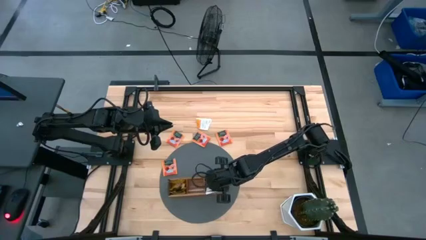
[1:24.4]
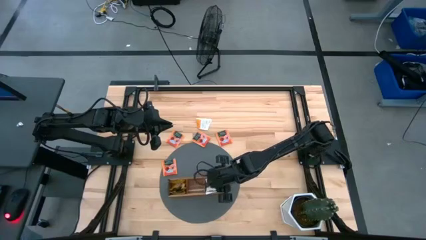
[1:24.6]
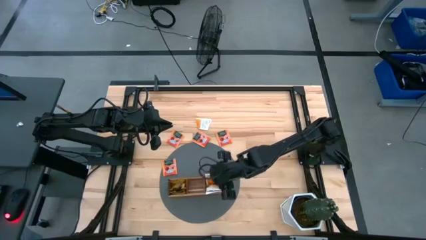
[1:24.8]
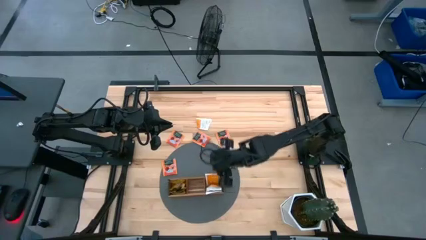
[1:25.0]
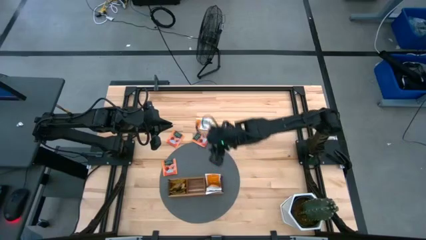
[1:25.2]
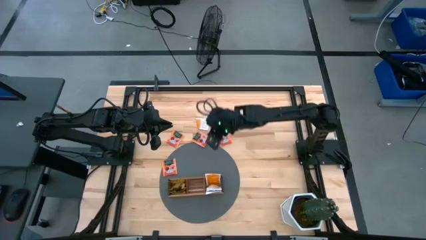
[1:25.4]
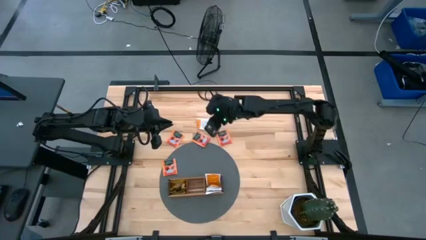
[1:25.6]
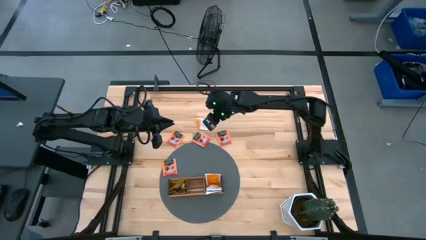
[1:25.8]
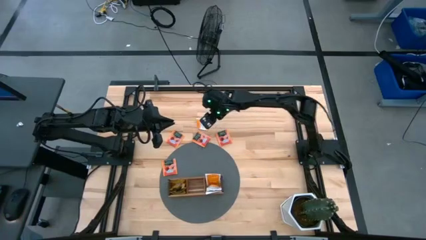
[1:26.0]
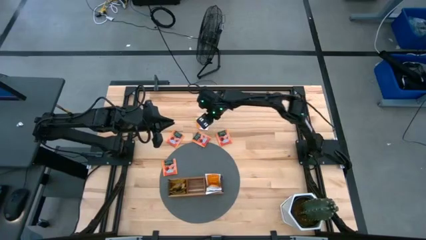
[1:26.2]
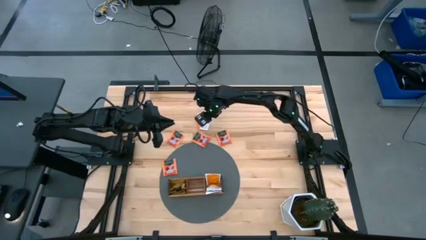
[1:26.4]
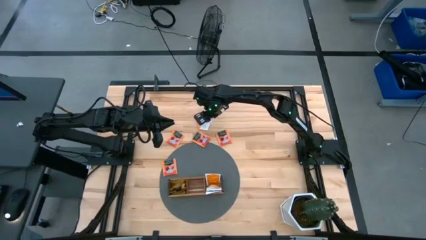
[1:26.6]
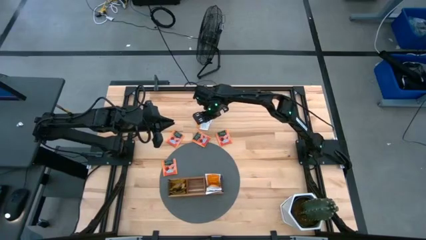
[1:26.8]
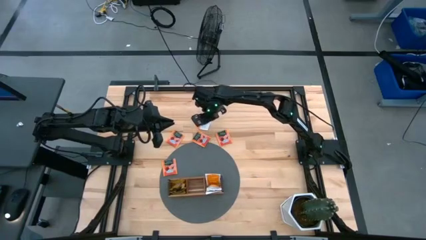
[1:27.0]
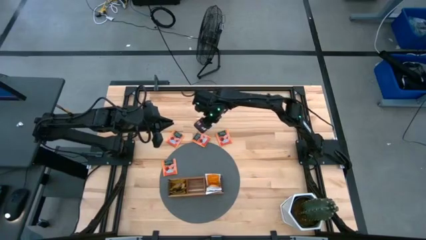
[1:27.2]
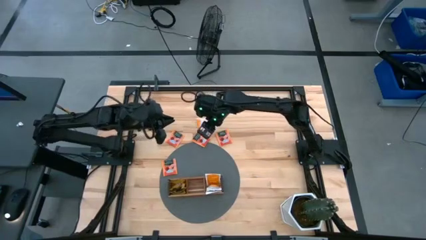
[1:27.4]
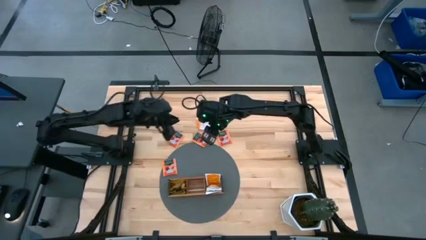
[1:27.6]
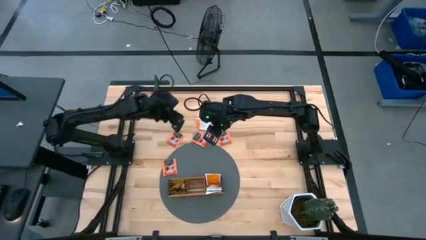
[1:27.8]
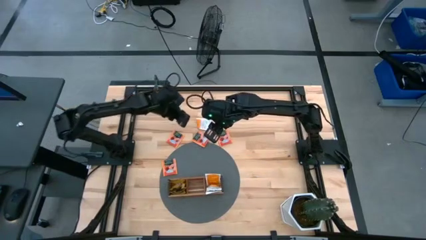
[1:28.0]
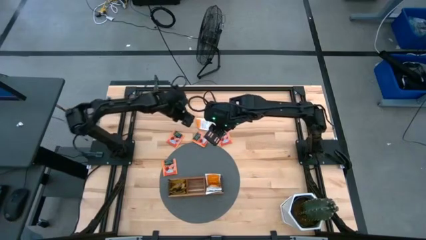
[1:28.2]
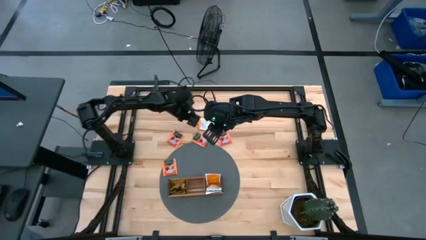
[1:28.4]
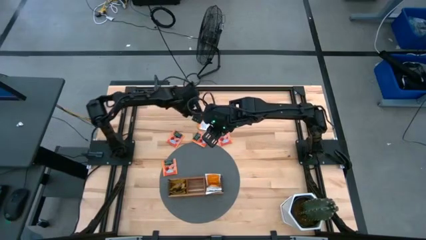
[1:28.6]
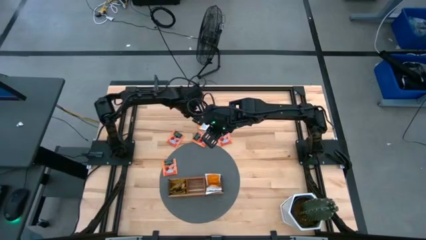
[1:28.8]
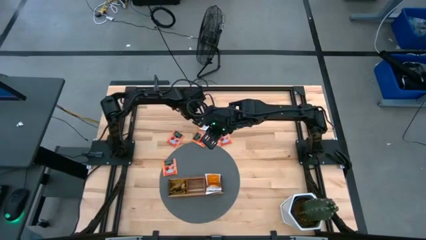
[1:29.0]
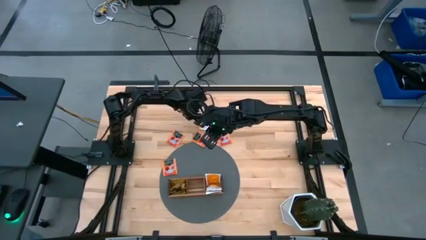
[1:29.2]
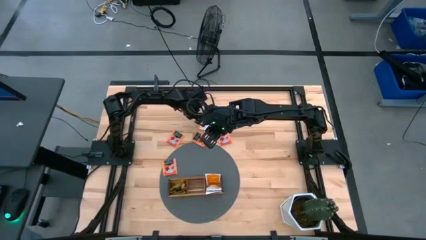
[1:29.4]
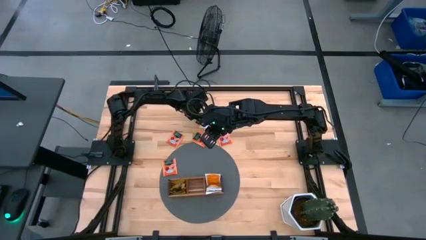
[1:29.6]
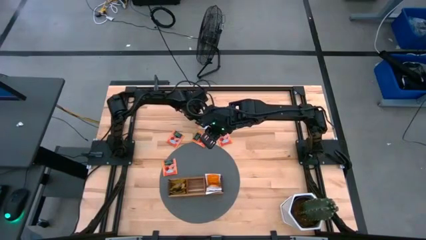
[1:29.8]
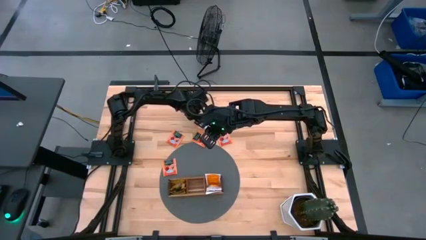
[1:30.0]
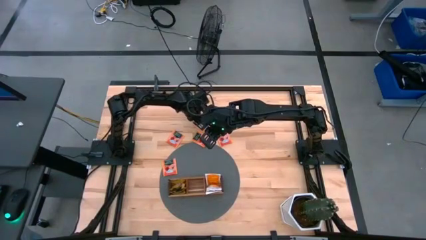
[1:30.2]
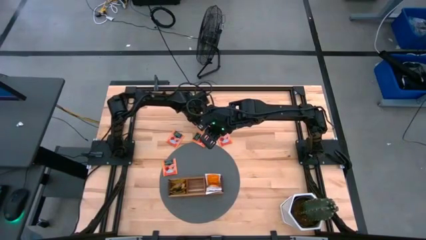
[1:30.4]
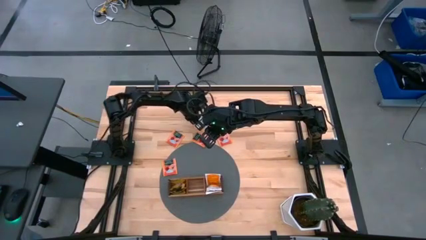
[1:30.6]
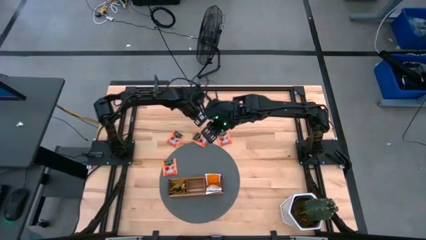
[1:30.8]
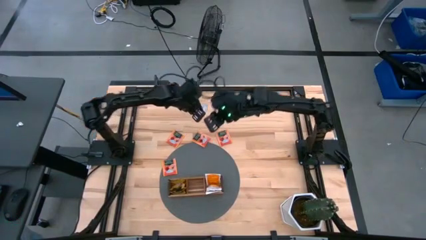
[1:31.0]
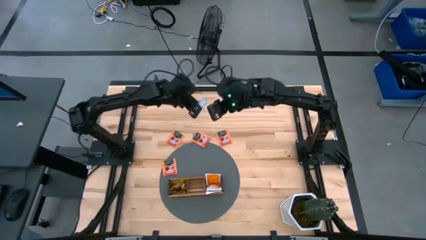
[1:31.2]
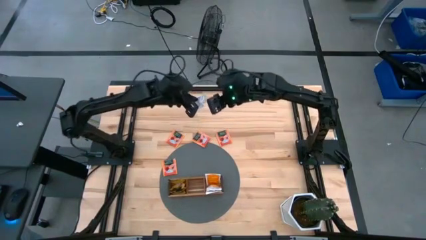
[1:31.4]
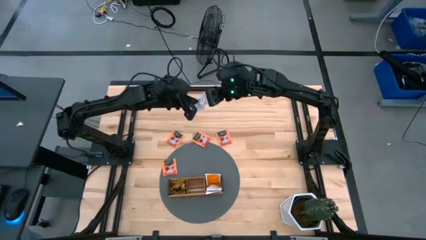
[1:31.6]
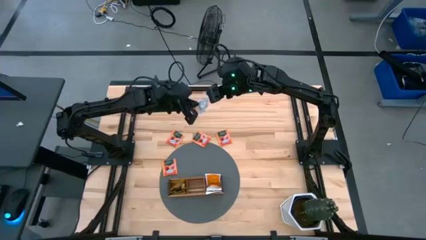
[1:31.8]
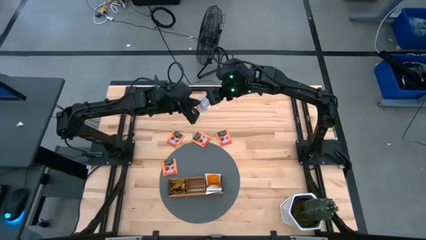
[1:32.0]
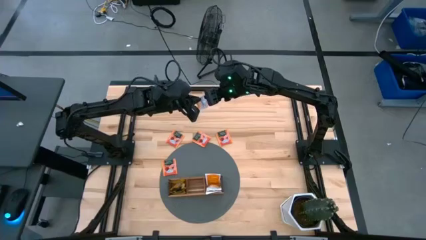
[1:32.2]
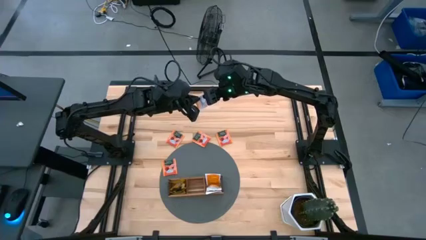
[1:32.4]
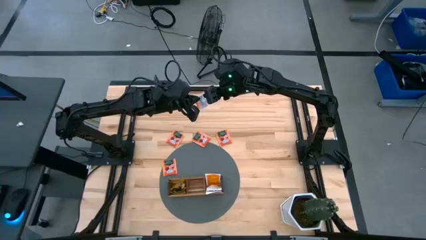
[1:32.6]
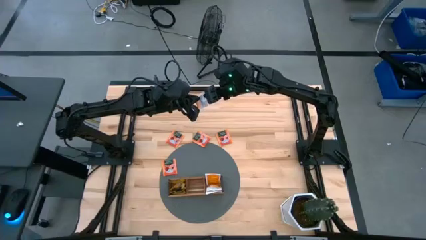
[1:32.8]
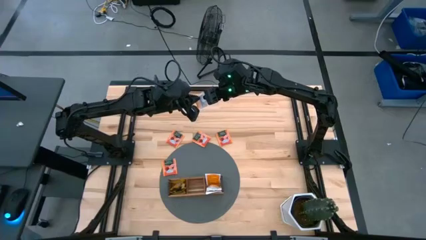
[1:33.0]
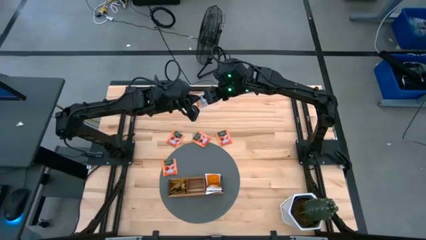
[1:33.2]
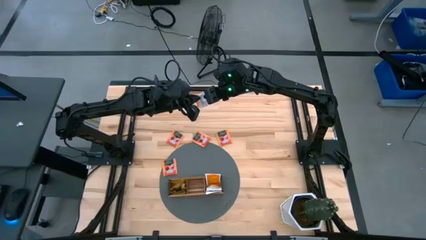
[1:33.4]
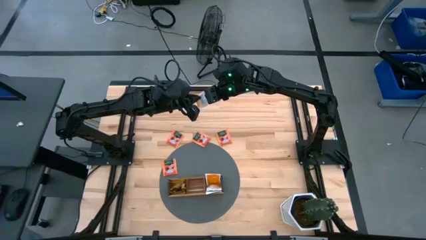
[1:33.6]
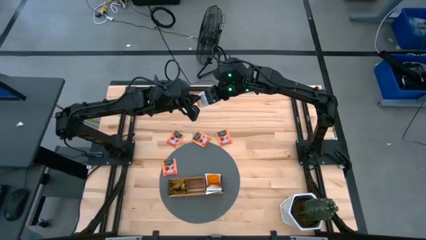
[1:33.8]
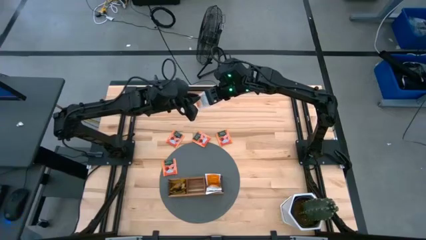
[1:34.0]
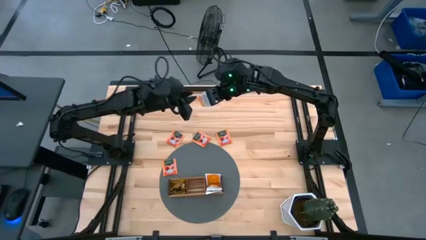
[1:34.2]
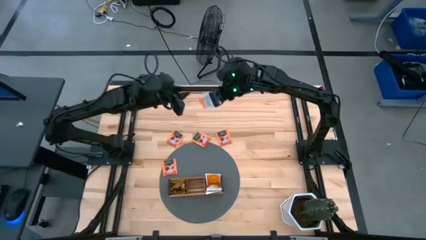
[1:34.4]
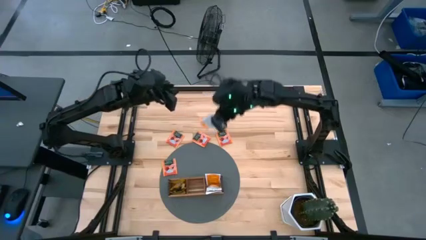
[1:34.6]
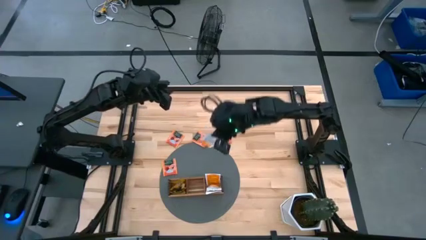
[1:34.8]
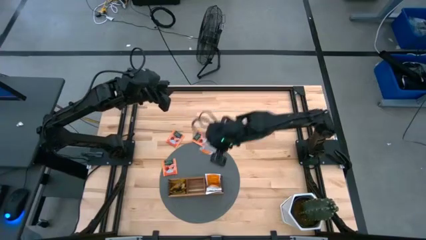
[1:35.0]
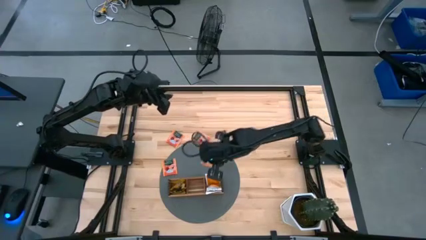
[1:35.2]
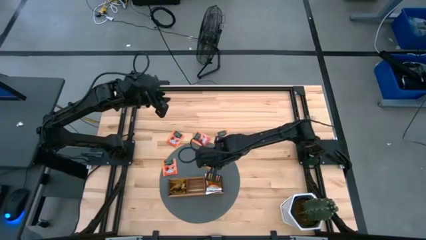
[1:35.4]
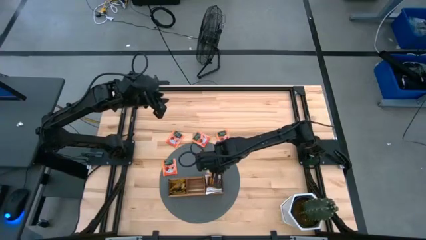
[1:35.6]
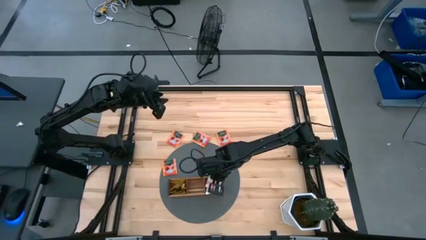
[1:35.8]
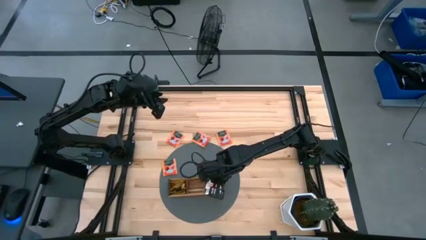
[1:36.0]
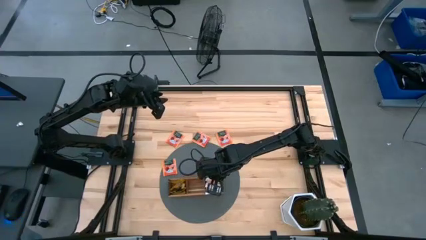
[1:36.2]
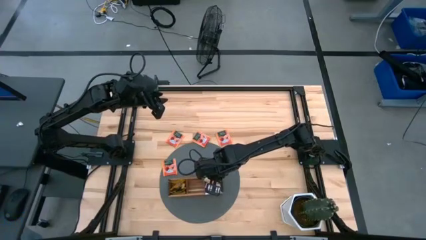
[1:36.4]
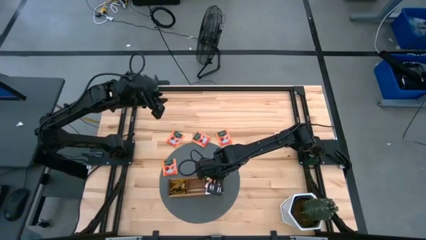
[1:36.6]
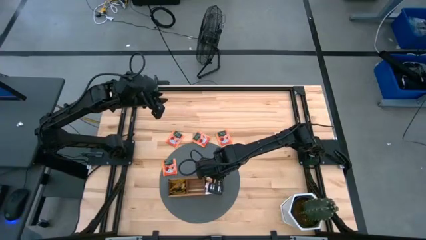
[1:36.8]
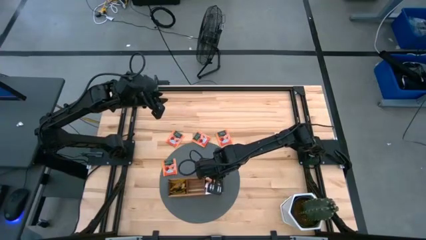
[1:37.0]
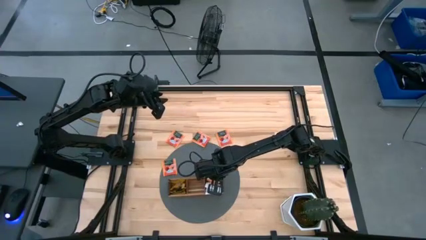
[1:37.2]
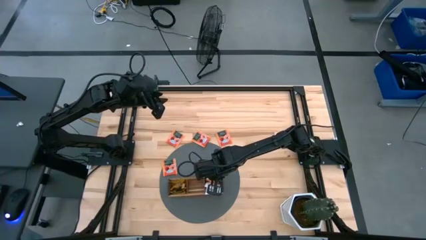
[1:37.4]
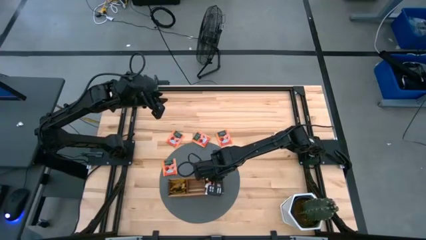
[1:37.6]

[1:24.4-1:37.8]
Task: Pick & Place Tea
Put the orange white tea bag into the right section of the wooden organizer
